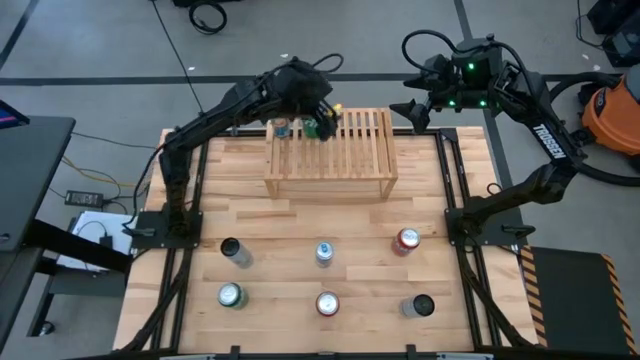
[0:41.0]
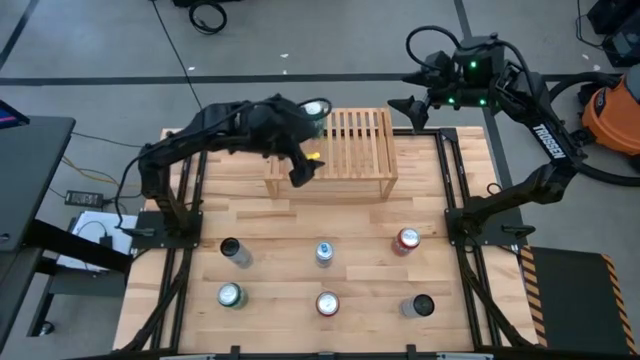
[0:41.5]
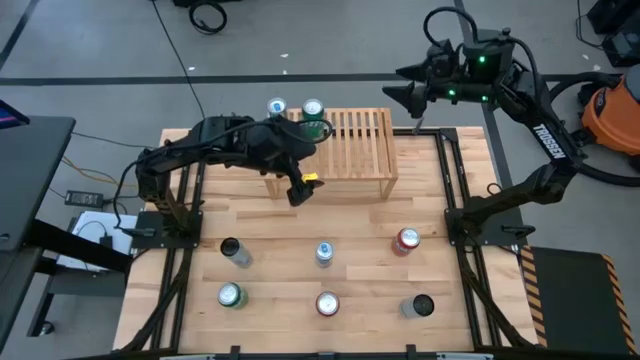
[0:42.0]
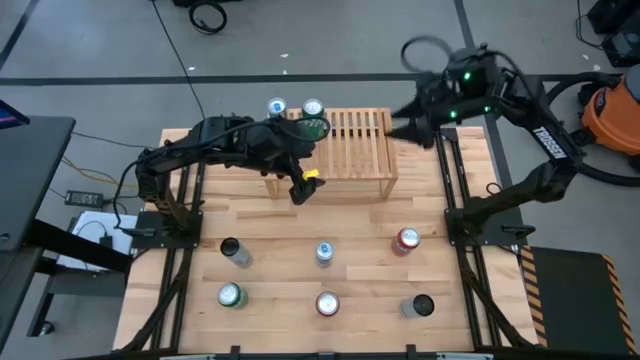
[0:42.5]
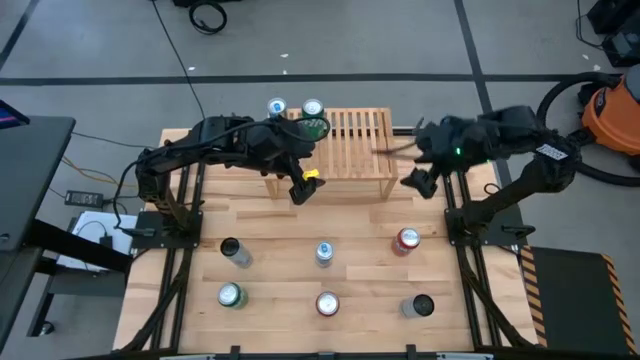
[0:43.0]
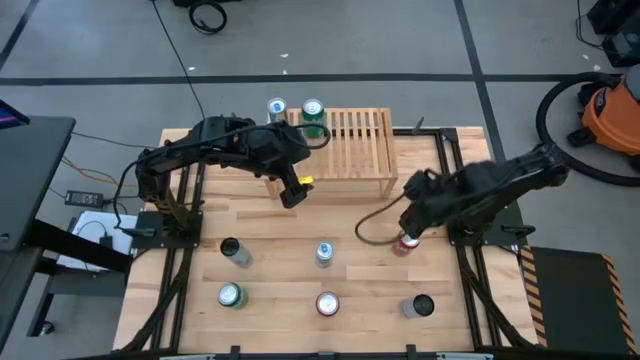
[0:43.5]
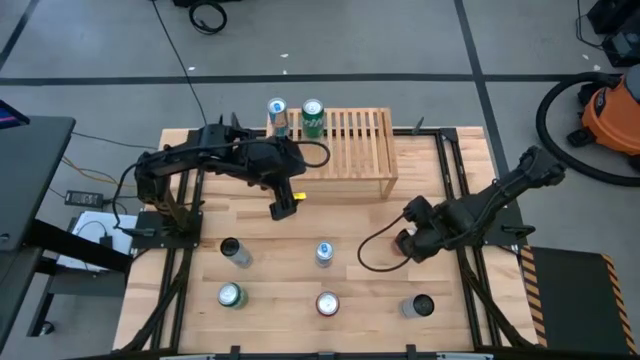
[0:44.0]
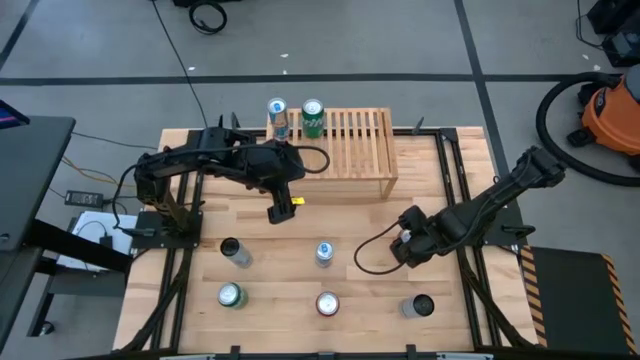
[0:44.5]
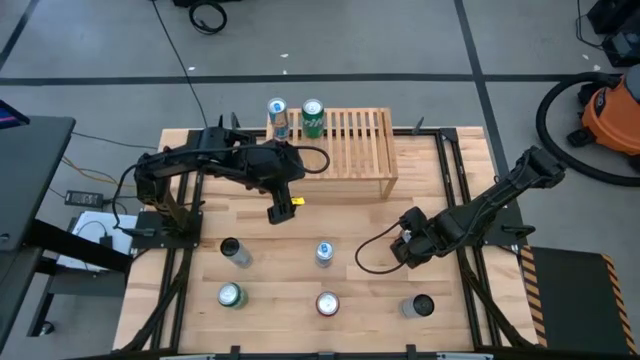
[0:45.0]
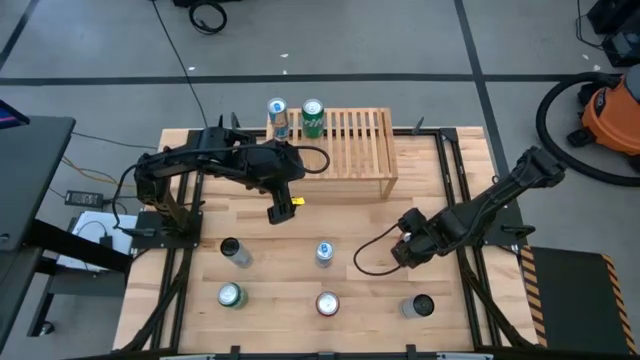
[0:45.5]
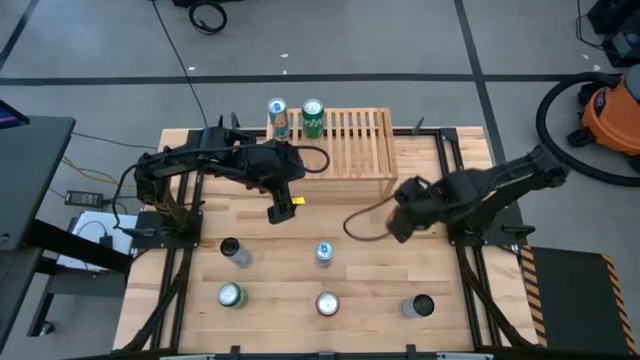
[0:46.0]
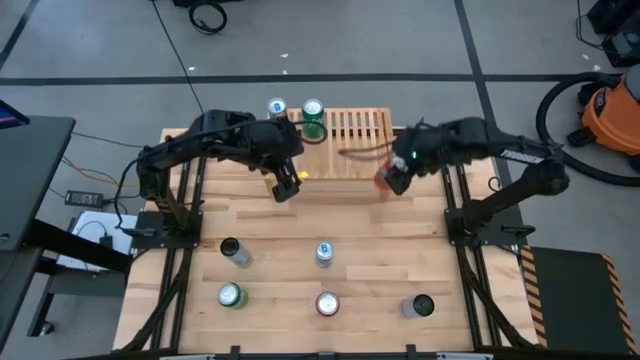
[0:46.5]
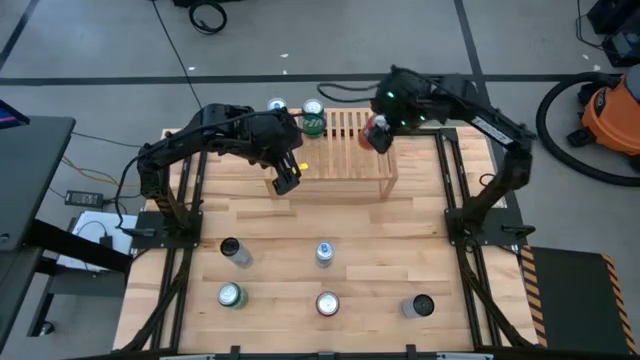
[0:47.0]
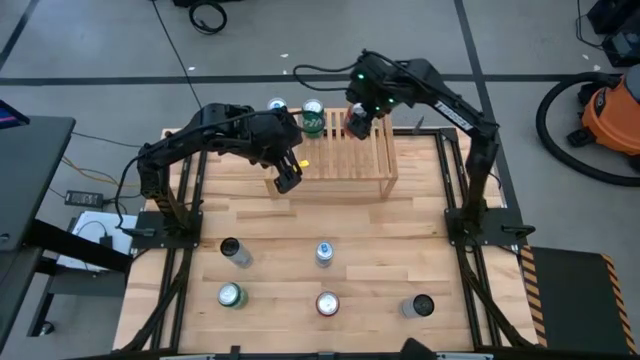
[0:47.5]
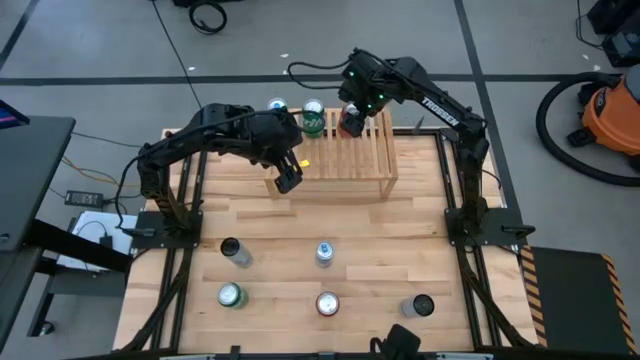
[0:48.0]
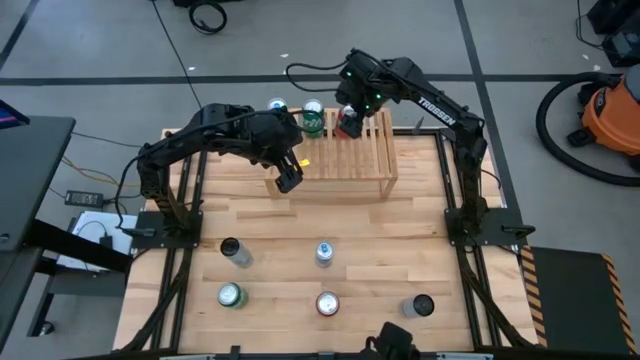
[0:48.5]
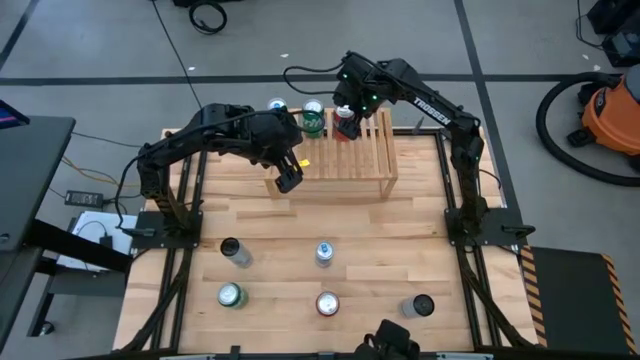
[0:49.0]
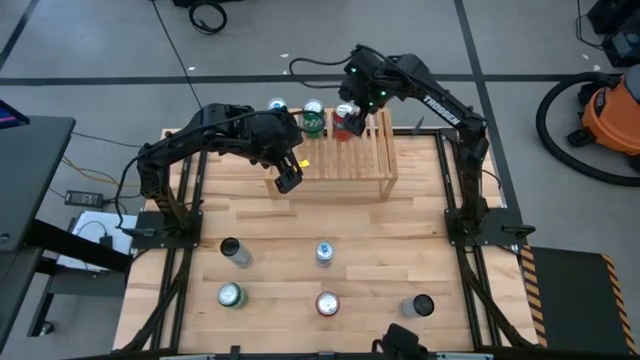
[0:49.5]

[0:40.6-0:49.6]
Task: Place canned beverage on shelf
Put the right orange soda can on the shelf

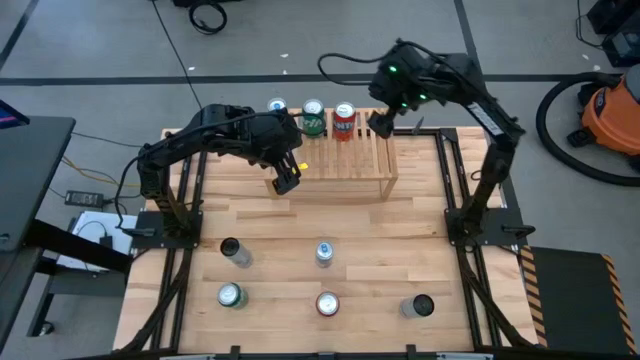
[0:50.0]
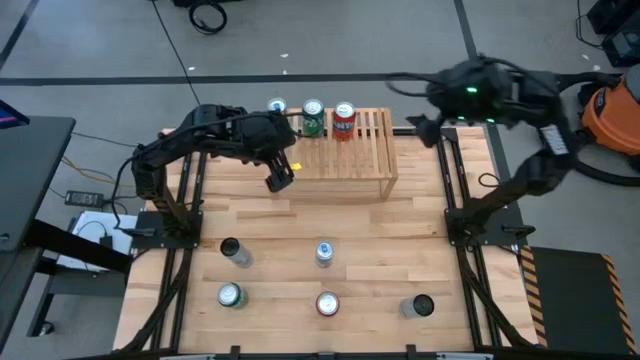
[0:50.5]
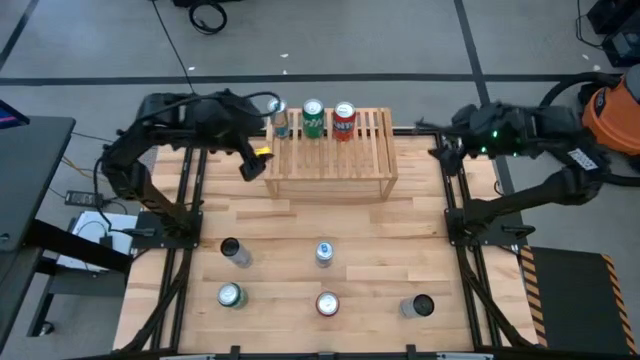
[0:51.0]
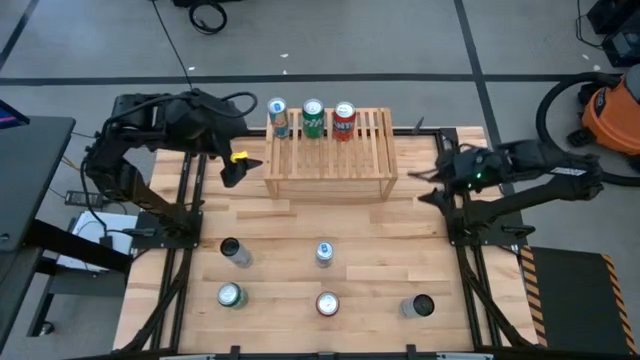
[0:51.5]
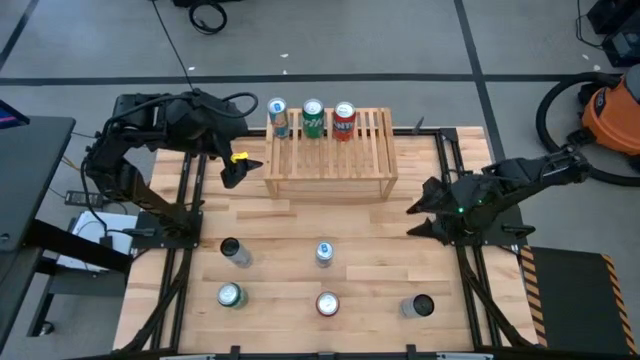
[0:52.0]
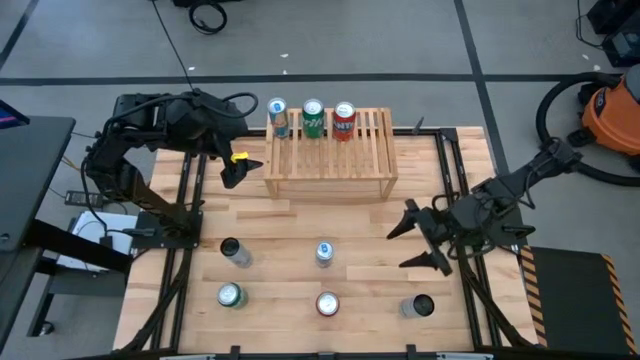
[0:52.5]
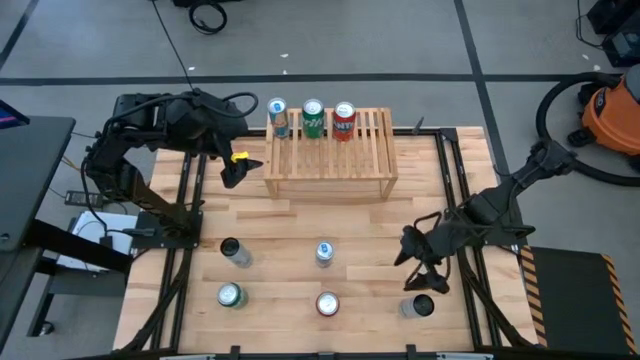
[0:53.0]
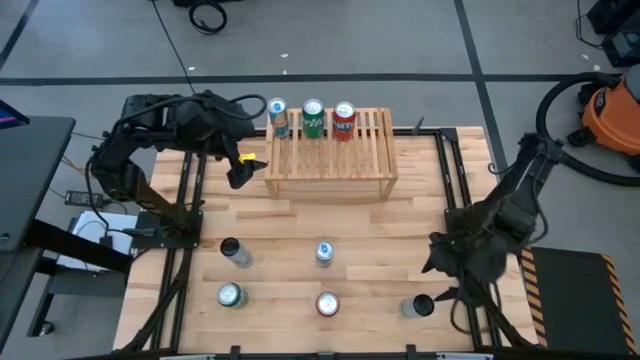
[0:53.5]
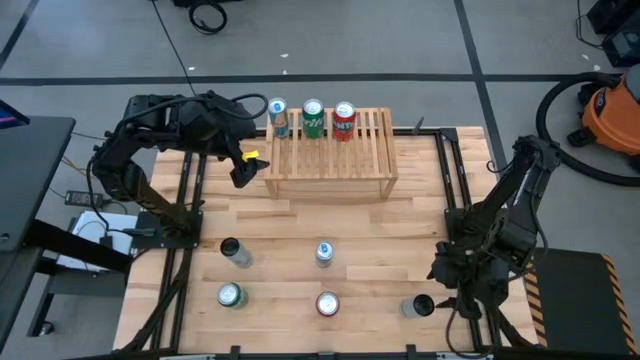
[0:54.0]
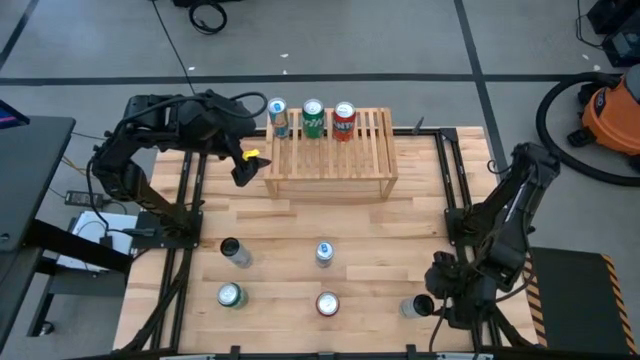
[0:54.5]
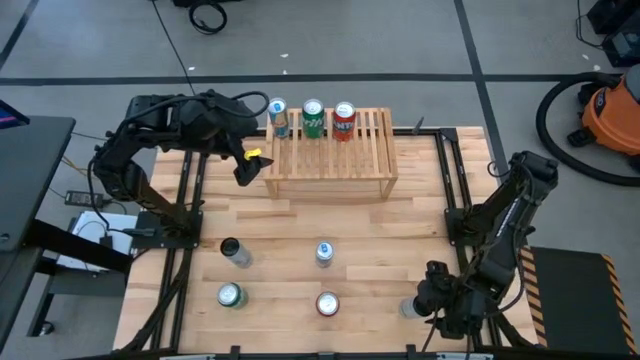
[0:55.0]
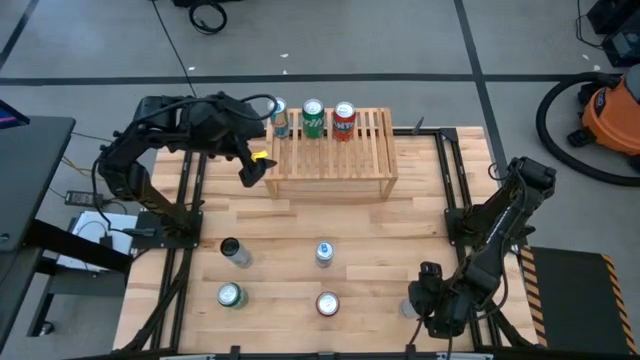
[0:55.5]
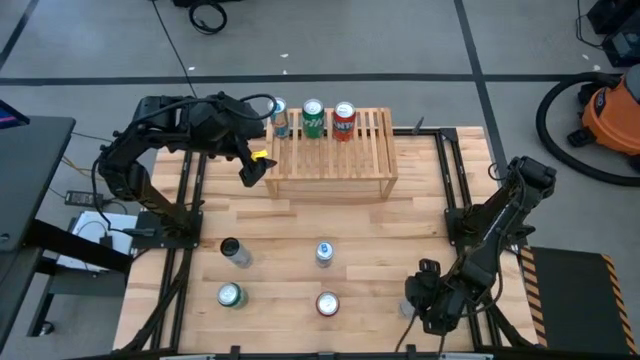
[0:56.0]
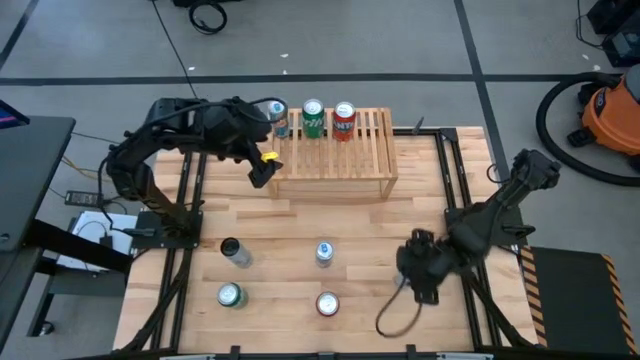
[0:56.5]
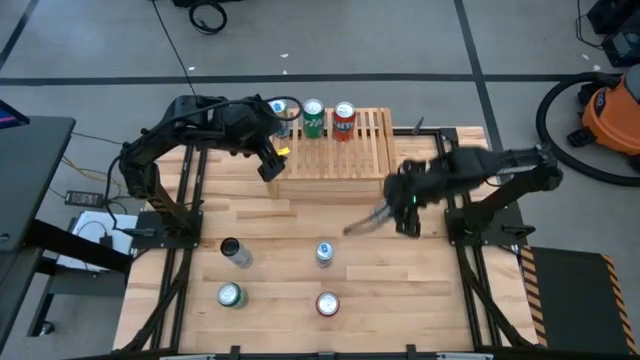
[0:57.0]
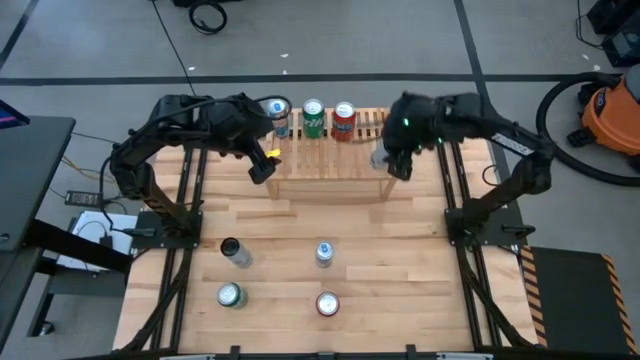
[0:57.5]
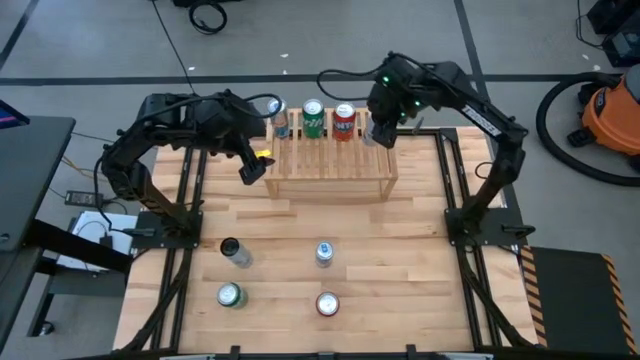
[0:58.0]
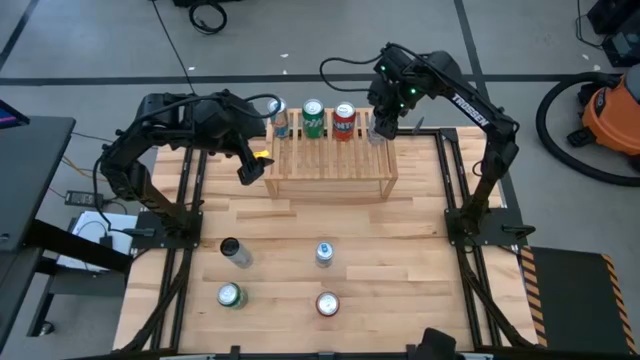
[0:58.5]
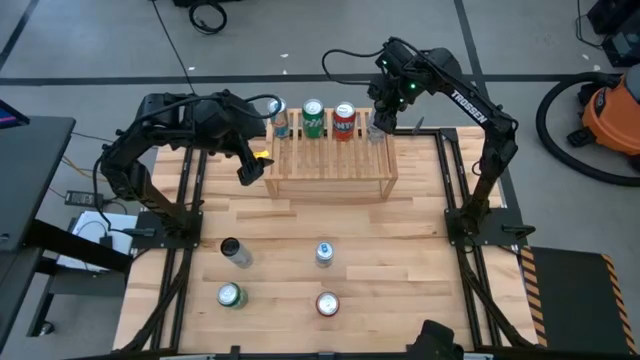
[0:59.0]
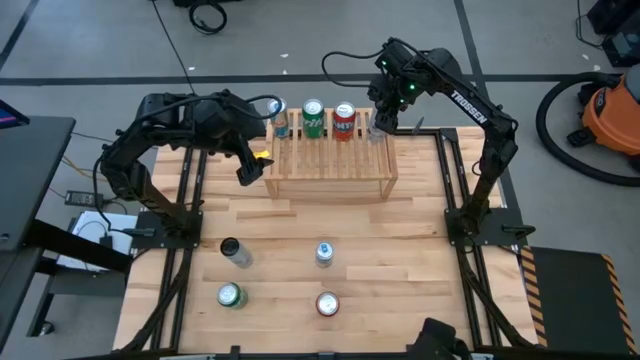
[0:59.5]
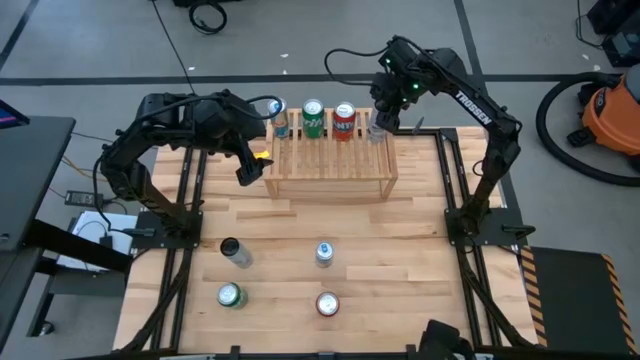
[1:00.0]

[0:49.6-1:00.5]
Put the right white soda can on the shelf

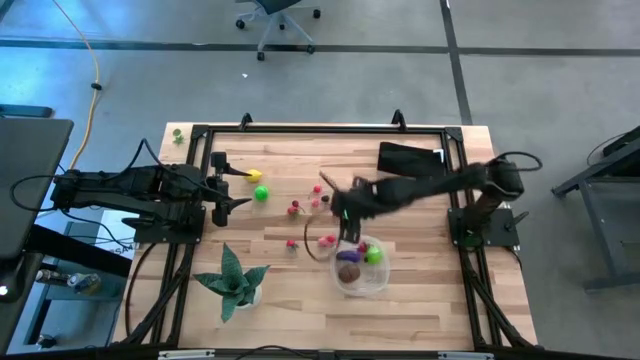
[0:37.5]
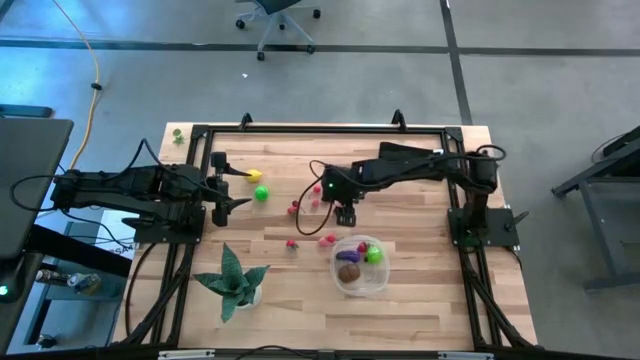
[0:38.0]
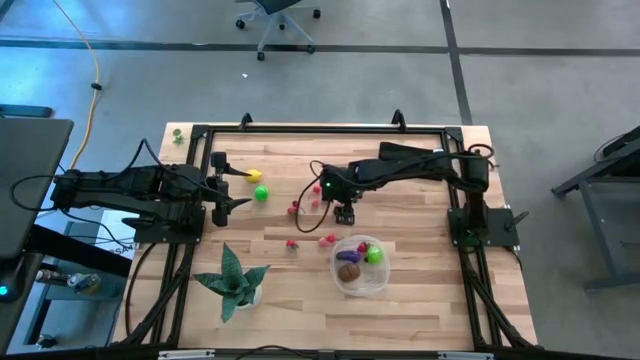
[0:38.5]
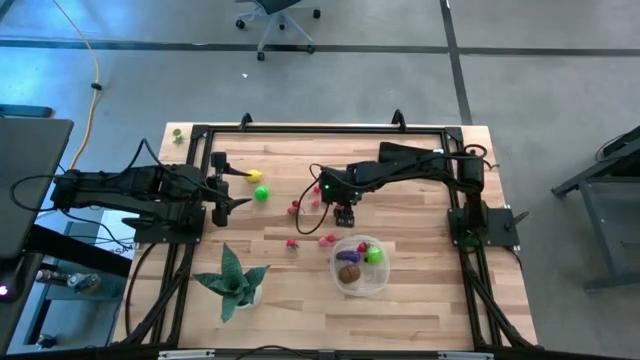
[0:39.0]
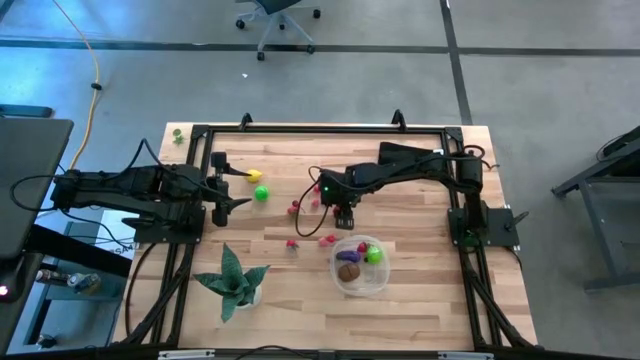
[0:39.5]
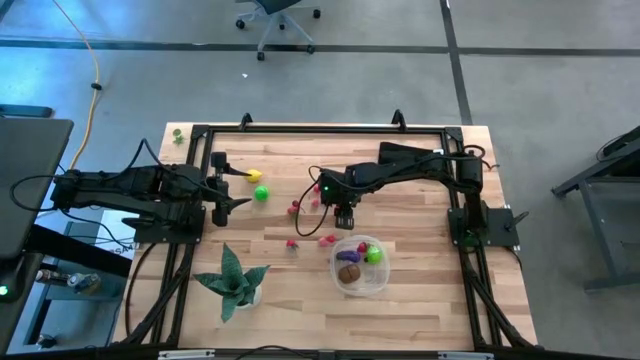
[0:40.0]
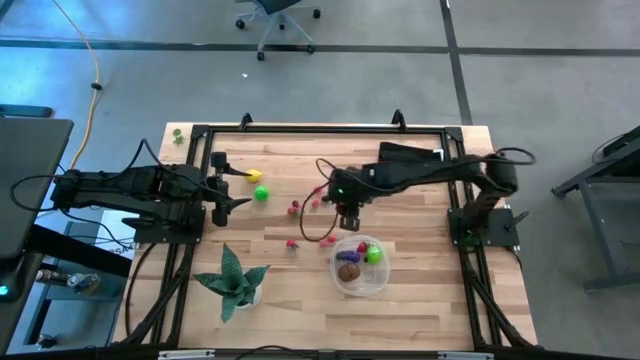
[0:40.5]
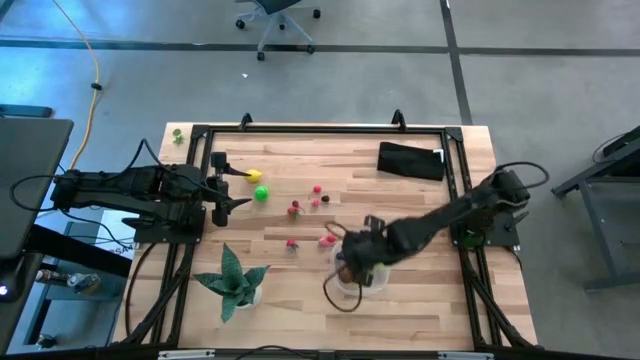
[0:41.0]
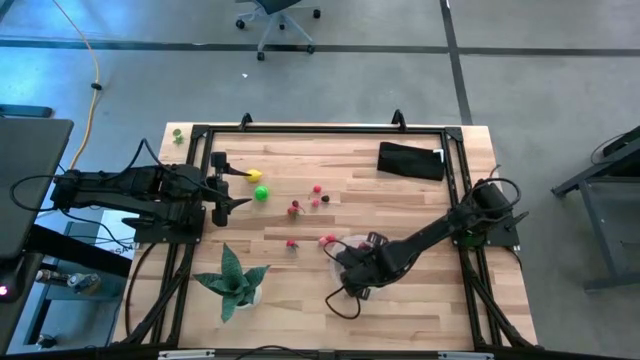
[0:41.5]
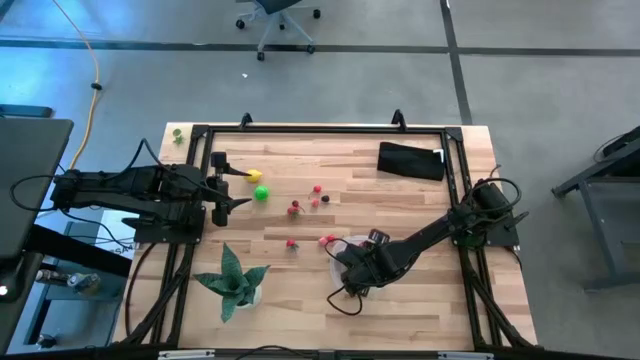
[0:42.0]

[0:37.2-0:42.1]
Task: Pick and placing Produce into tupperware
Put the right strawberry into the transparent bin
